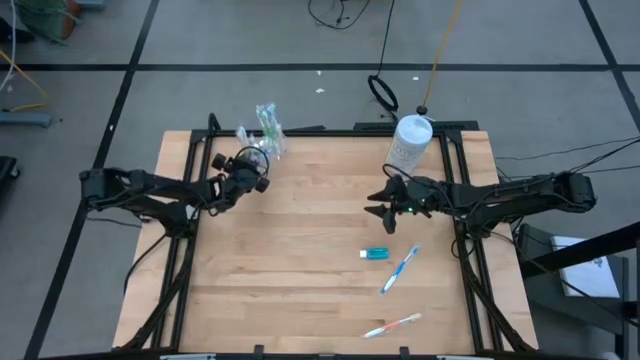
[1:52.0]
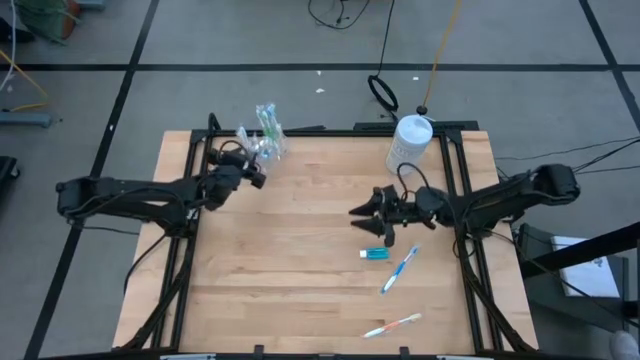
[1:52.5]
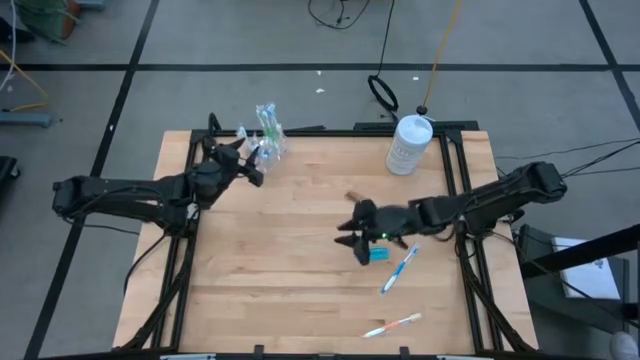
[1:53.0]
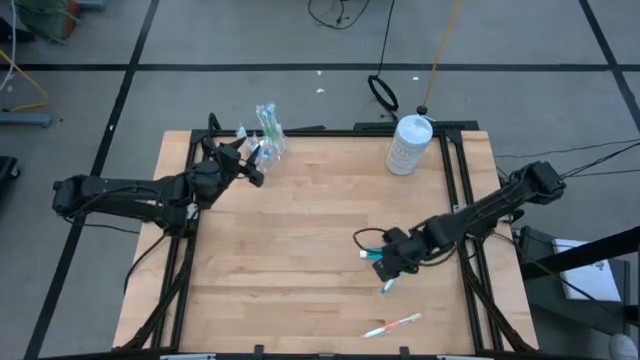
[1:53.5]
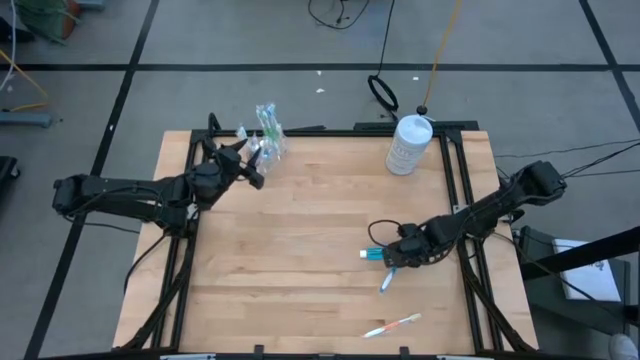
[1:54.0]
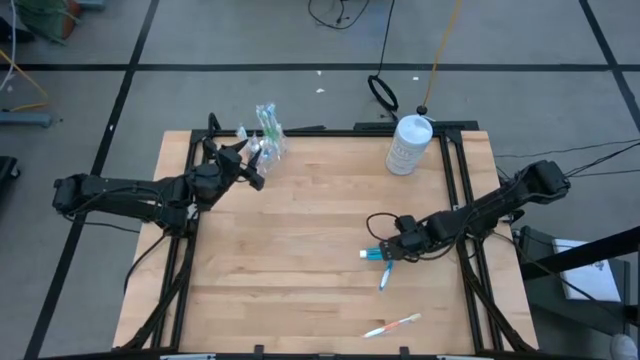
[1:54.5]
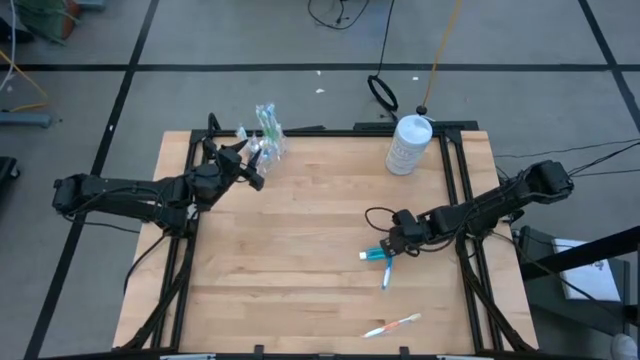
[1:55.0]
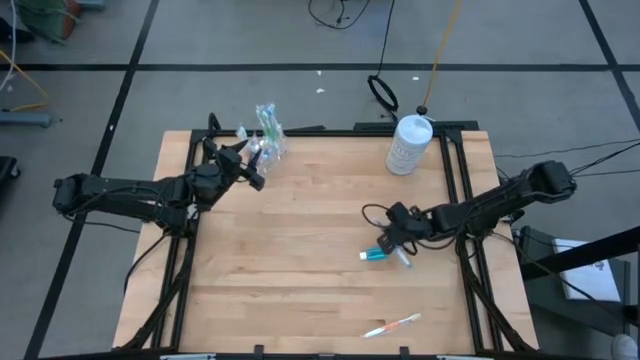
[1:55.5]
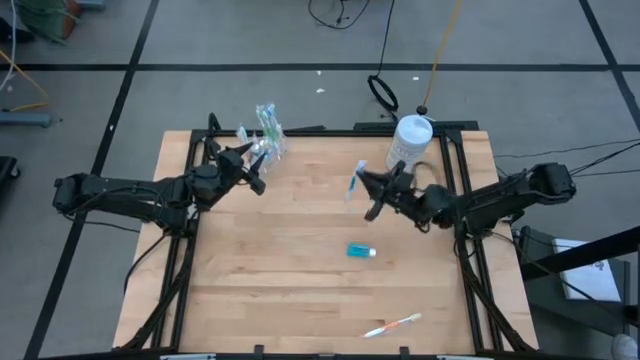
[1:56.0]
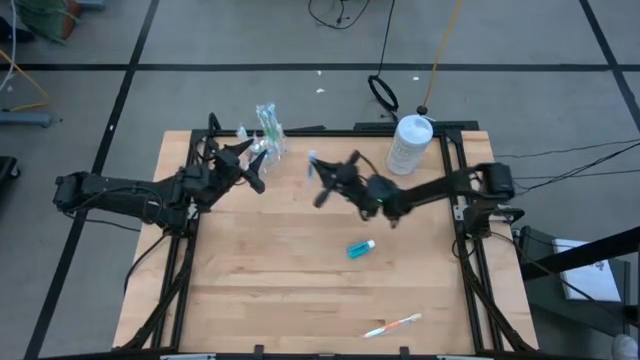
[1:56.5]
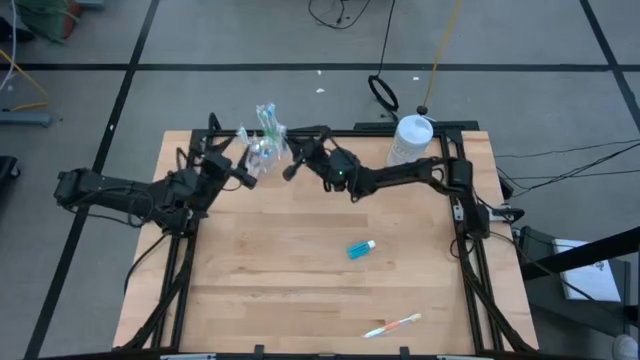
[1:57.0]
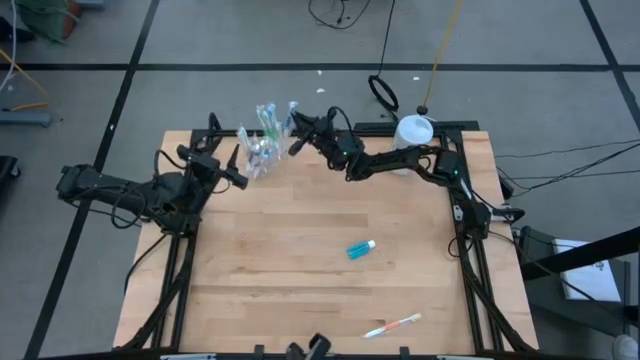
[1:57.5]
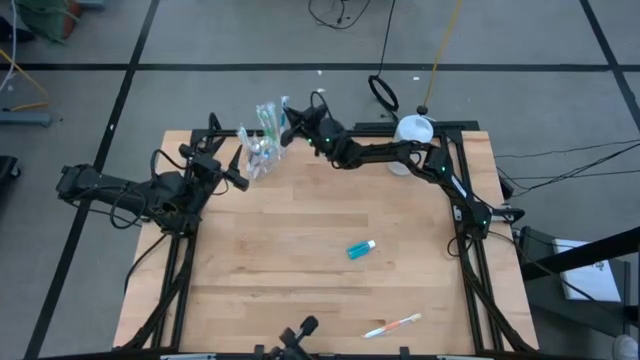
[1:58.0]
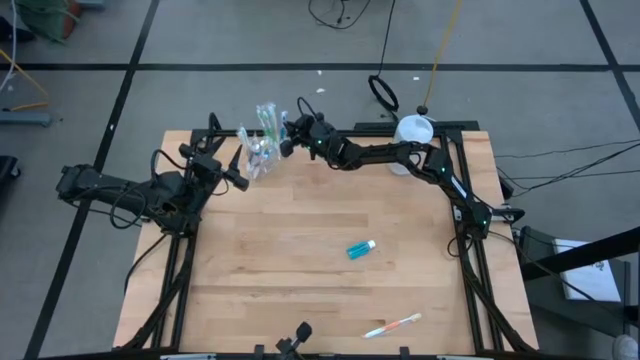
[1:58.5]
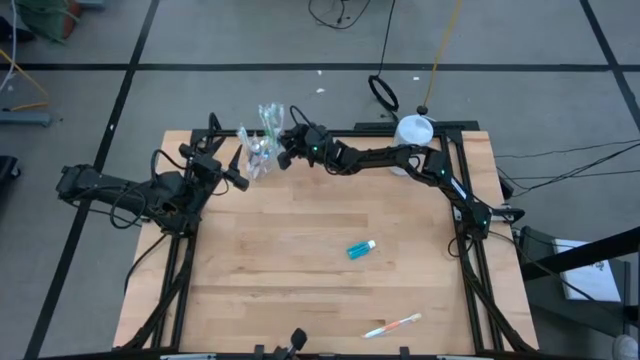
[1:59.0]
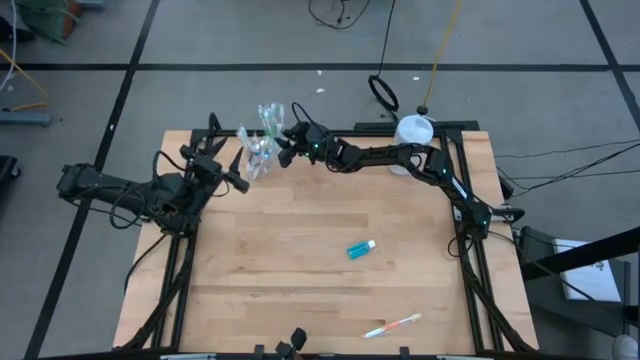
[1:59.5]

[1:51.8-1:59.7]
Task: Pick & Place toothbrushing station
Put the blue toothbrush into the transparent organizer

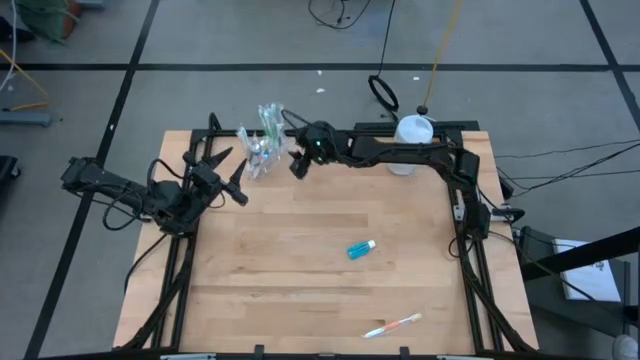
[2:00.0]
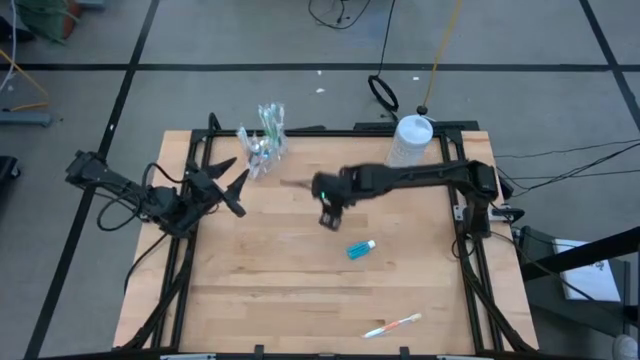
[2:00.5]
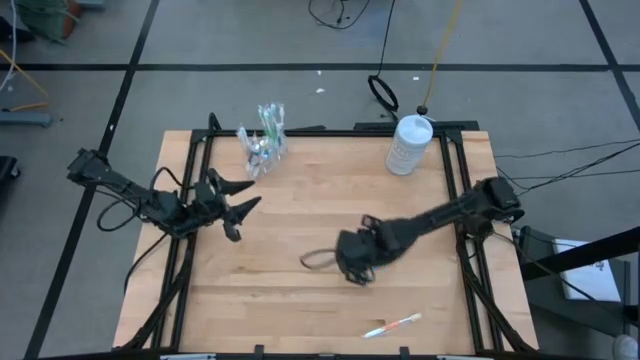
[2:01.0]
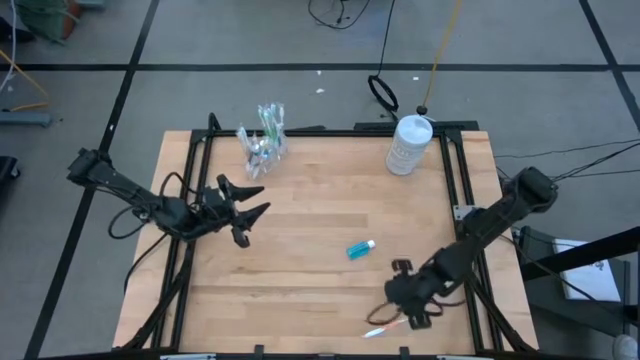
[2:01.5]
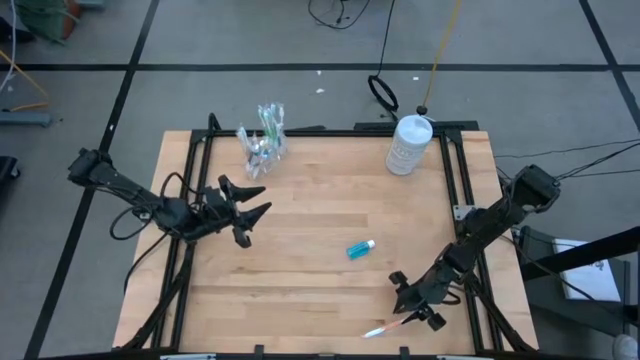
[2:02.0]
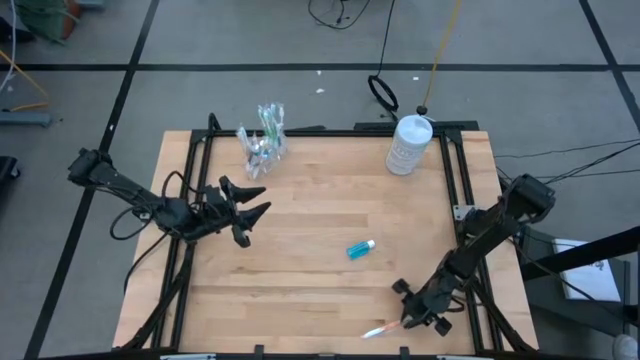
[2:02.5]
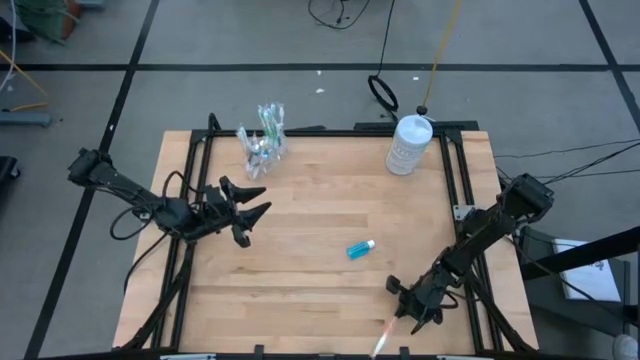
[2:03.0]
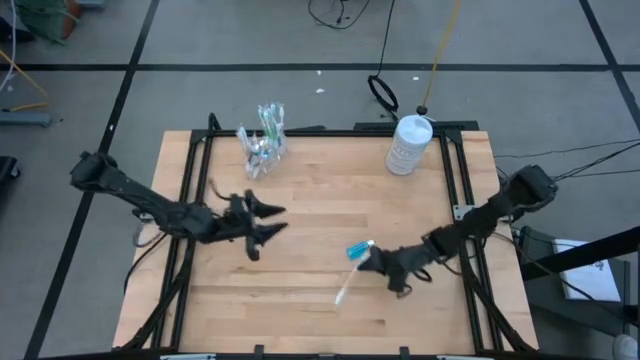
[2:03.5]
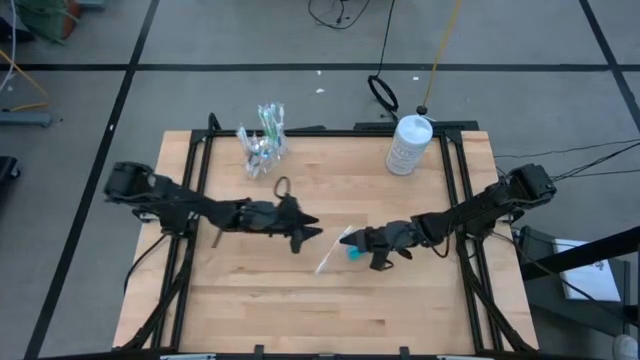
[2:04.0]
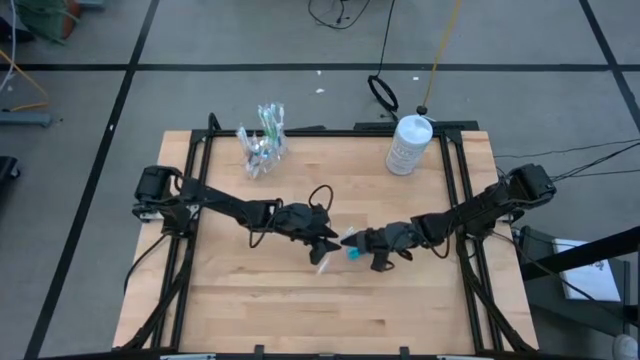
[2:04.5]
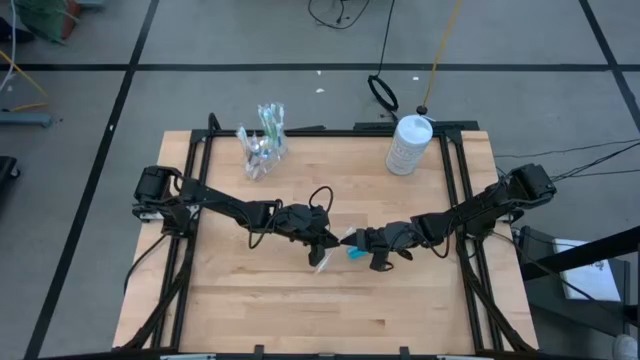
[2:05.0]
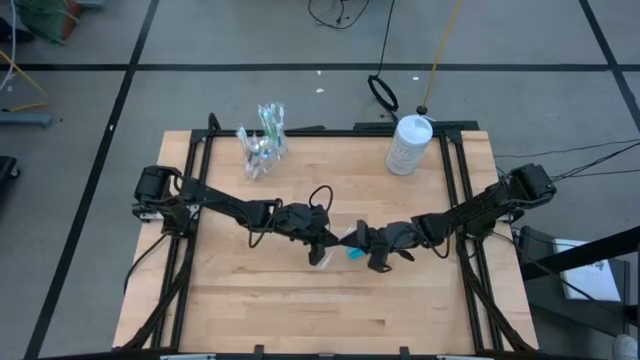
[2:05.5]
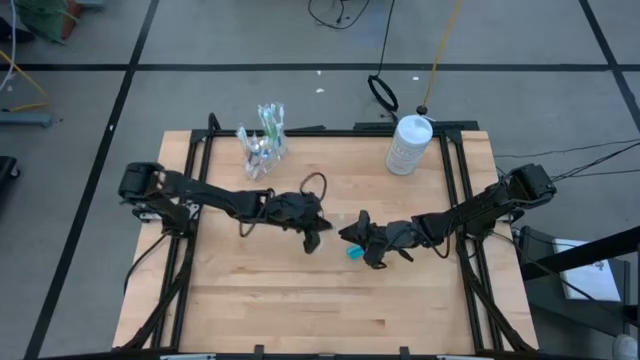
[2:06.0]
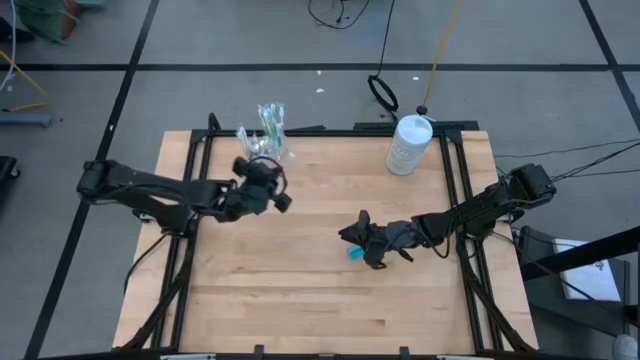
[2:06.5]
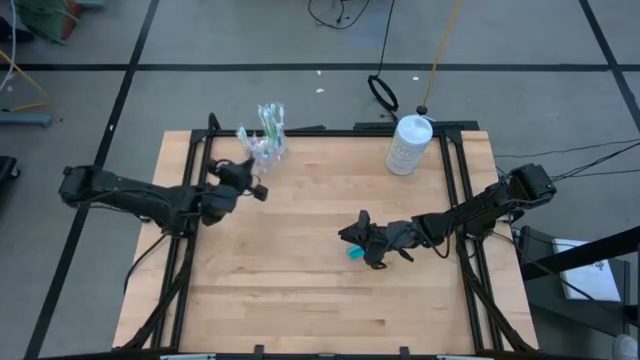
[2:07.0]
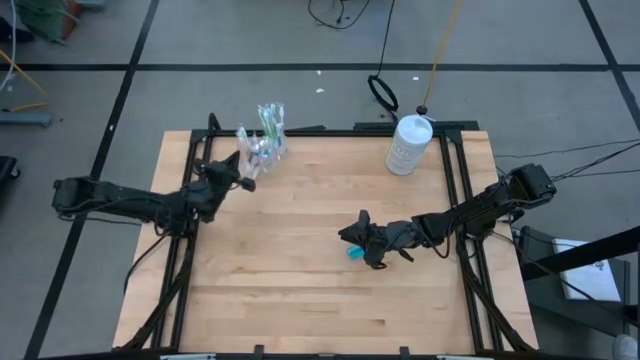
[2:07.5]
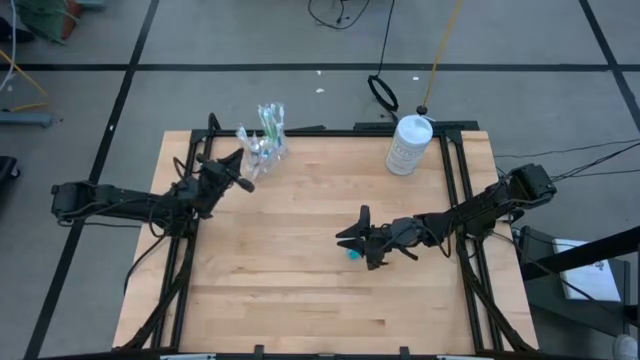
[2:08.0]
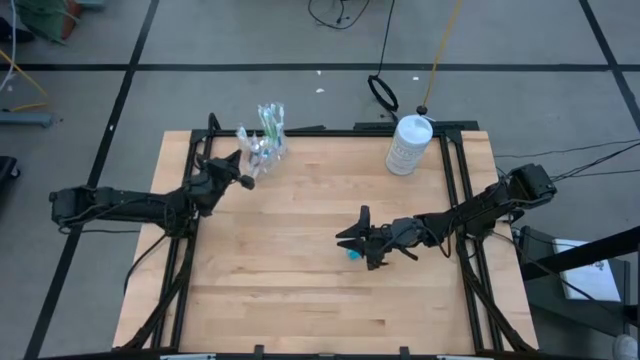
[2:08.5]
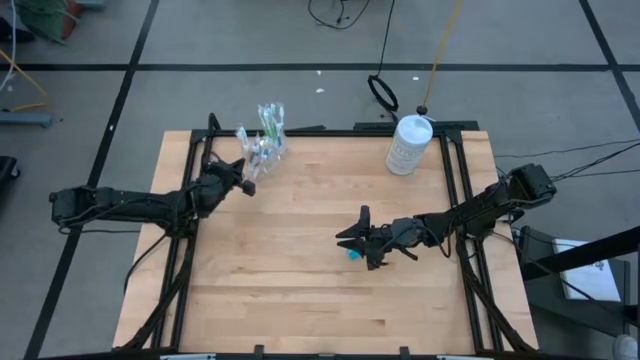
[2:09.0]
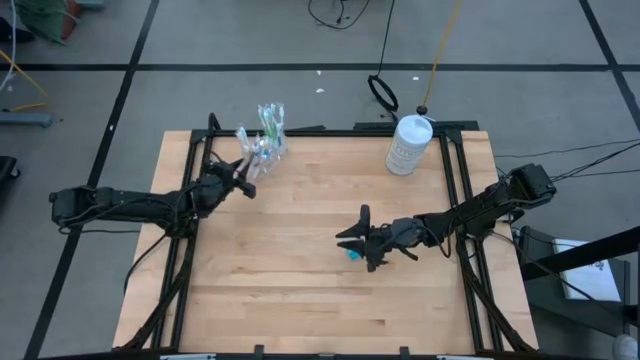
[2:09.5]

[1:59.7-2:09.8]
Put the orange toothbrush into the transparent organizer

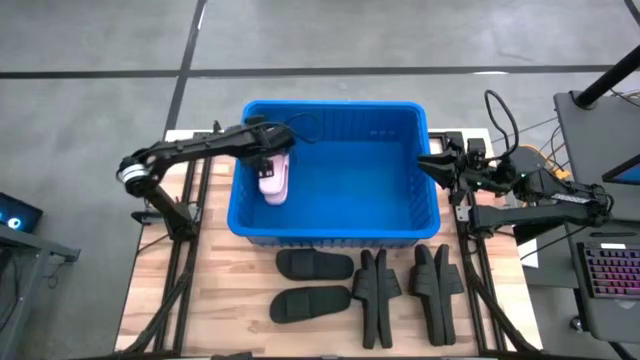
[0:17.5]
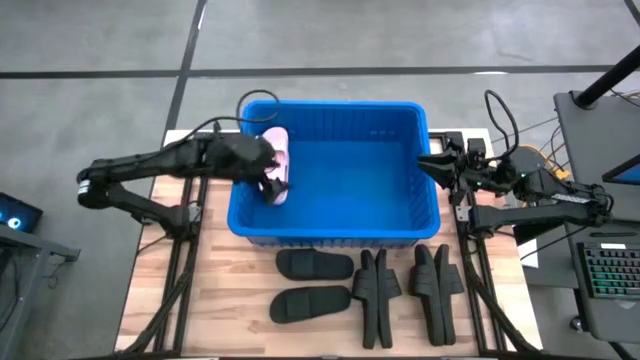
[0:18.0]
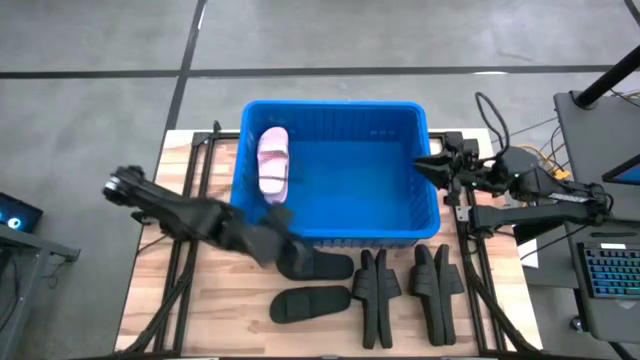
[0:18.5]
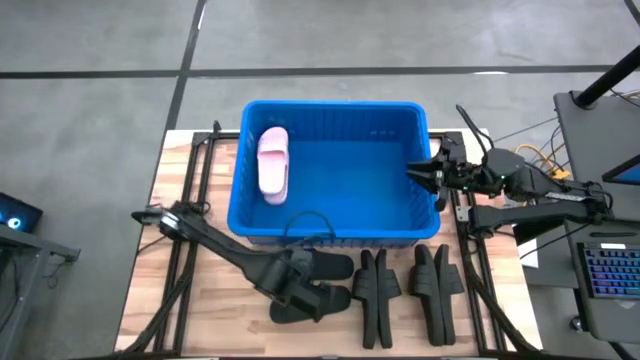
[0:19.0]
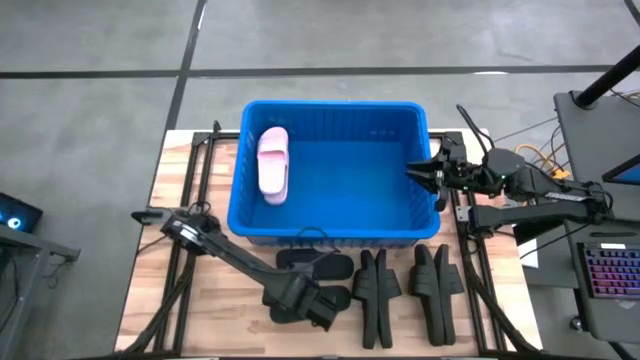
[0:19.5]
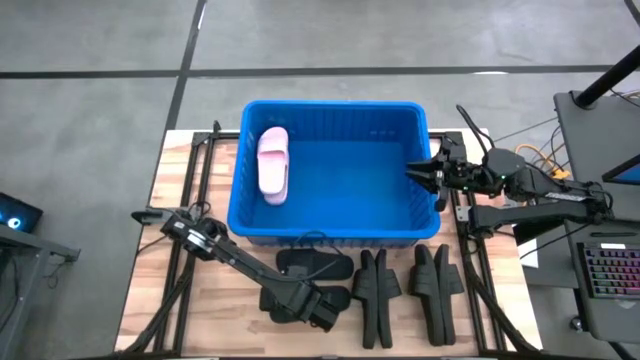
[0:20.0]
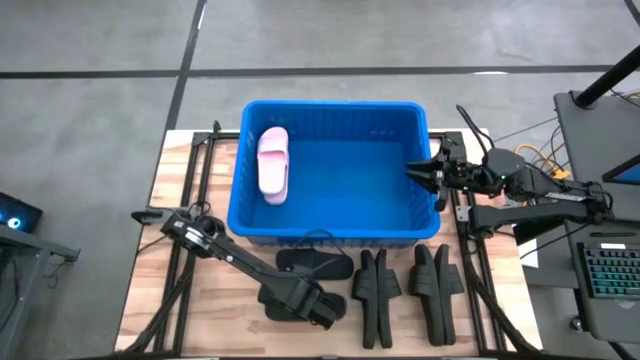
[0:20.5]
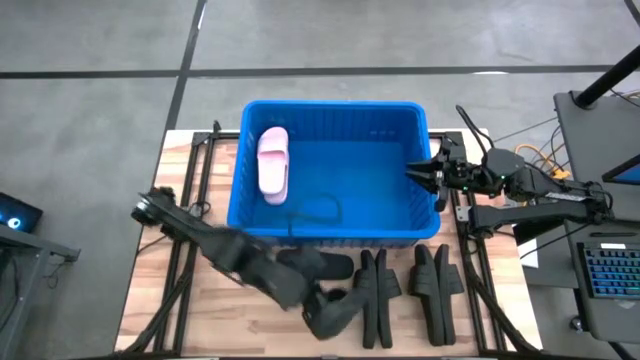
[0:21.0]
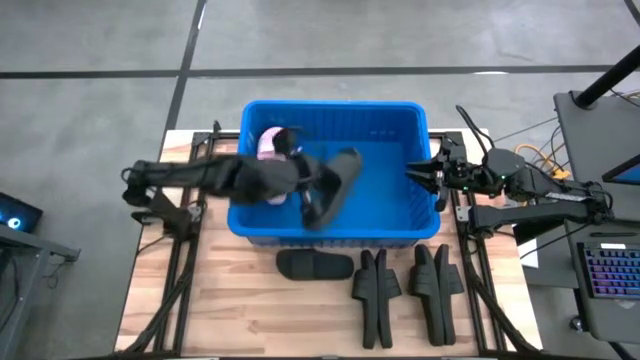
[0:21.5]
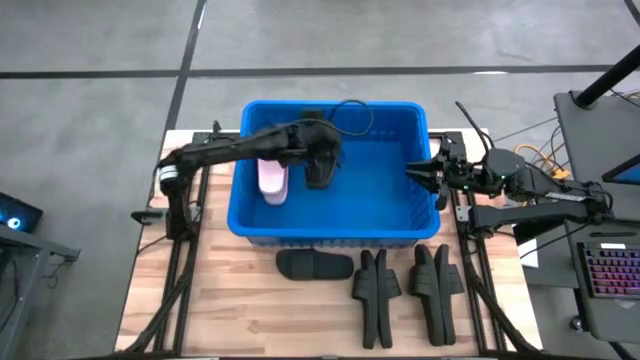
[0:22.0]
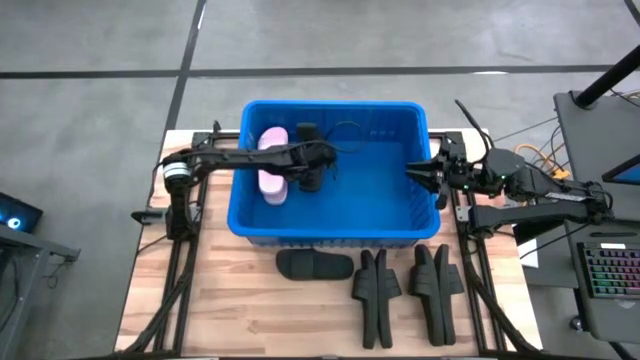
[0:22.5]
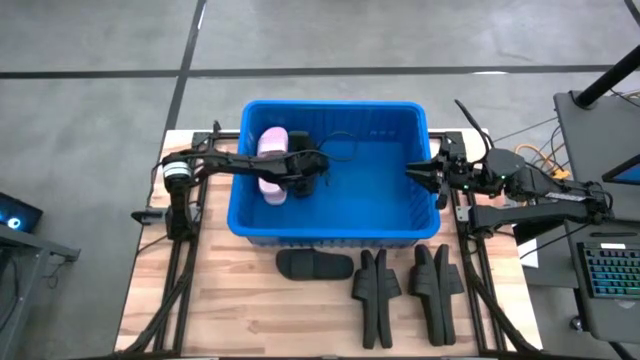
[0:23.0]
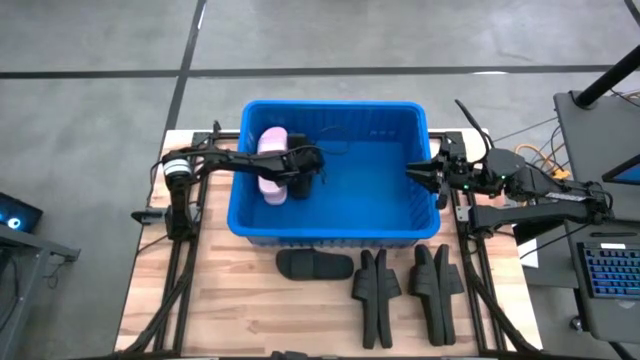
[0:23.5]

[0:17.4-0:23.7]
Task: Pick and place slides into bin
Put the black slipper into the blue bin
